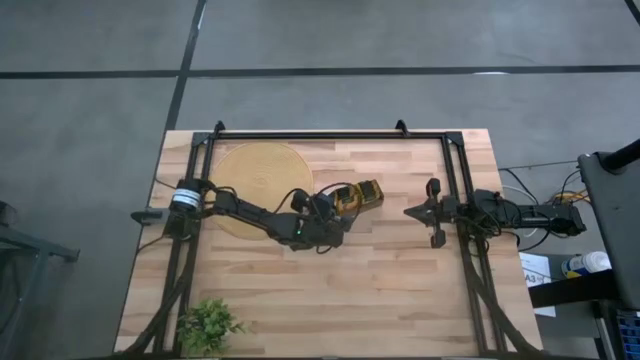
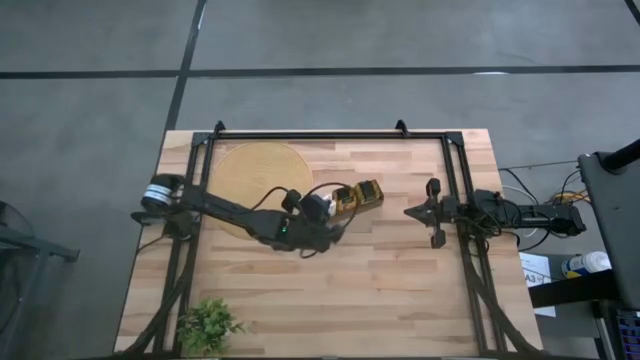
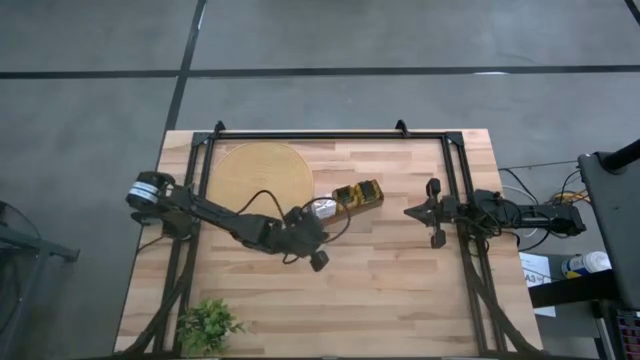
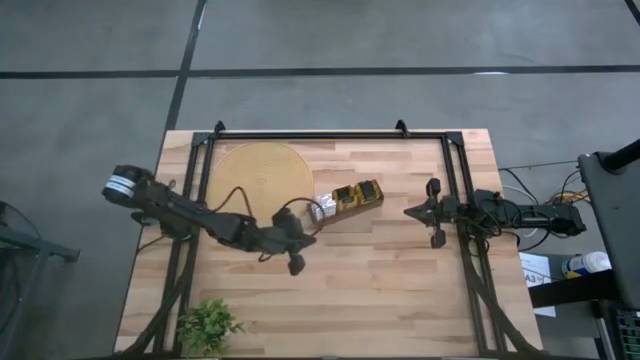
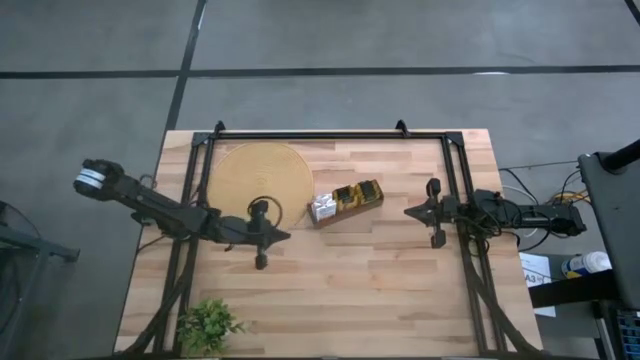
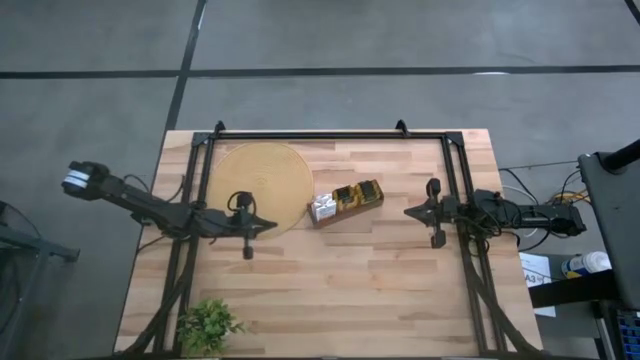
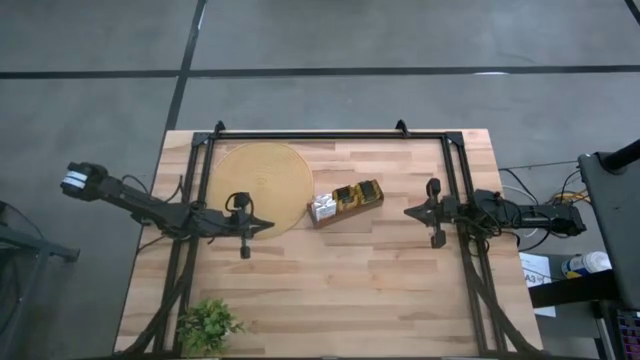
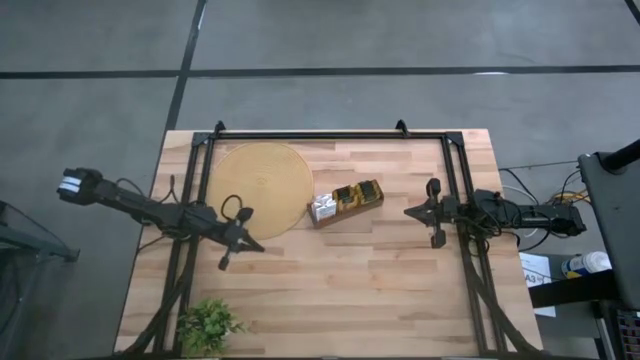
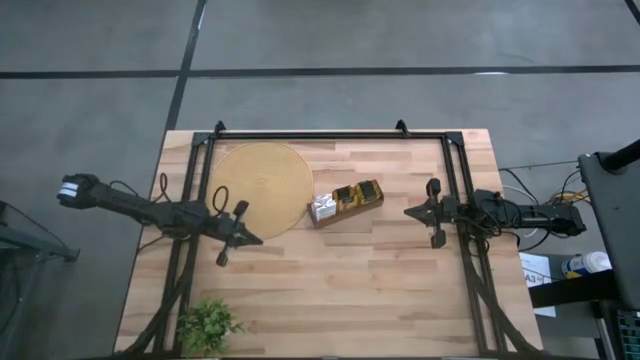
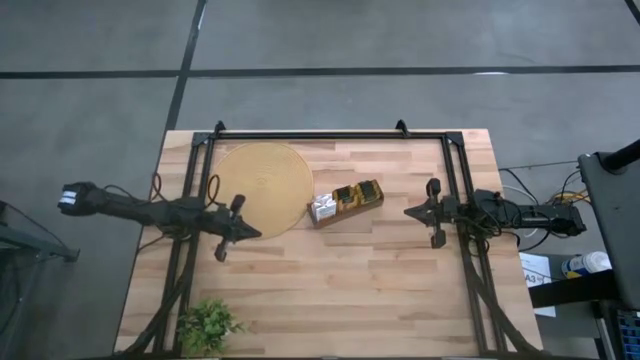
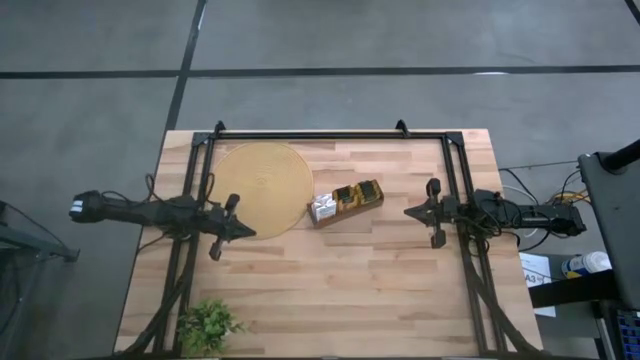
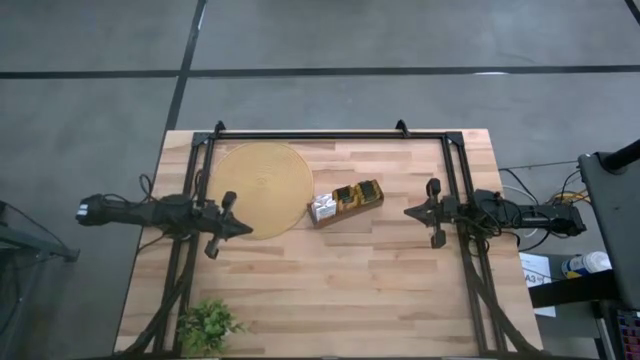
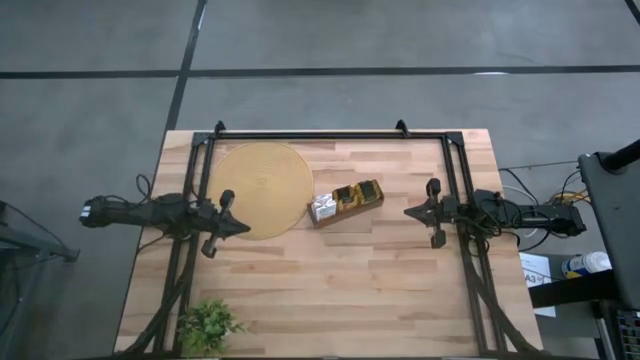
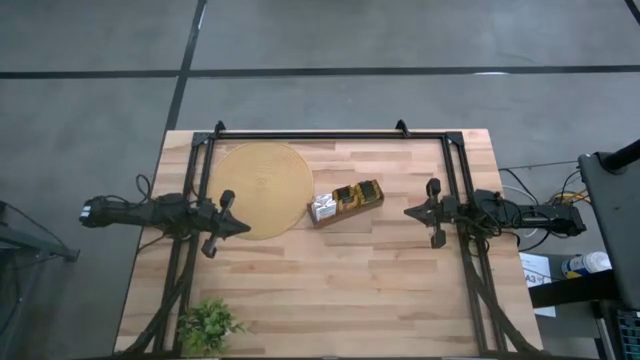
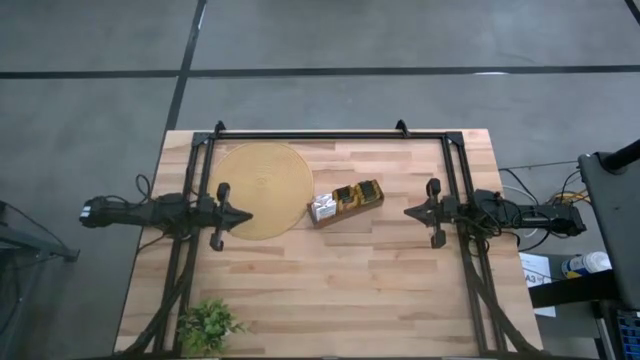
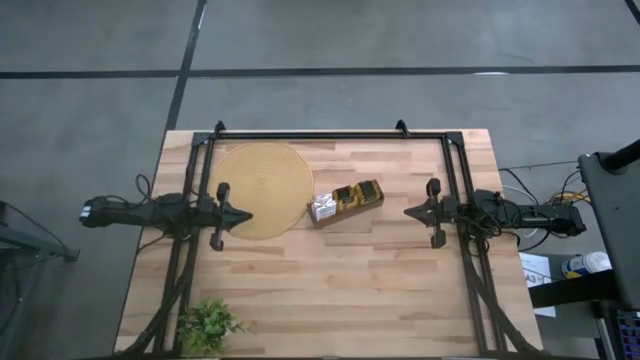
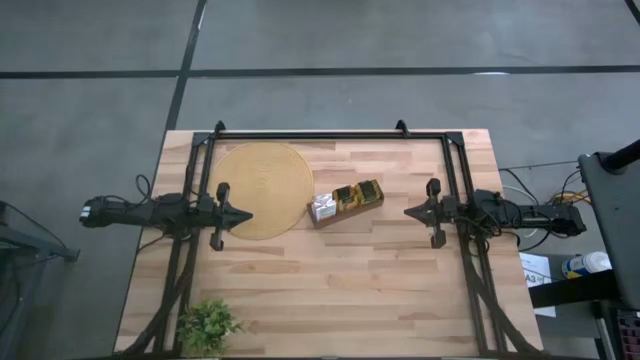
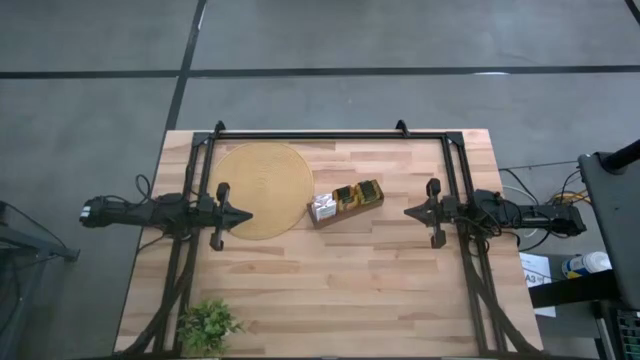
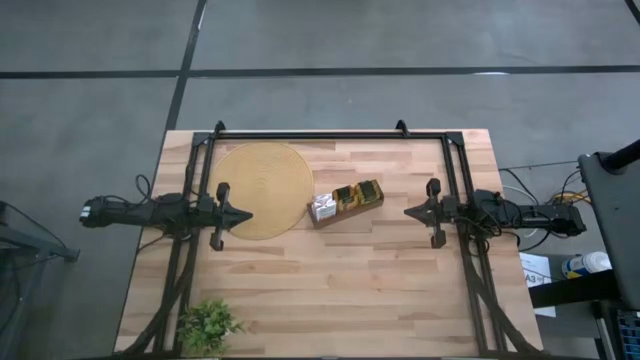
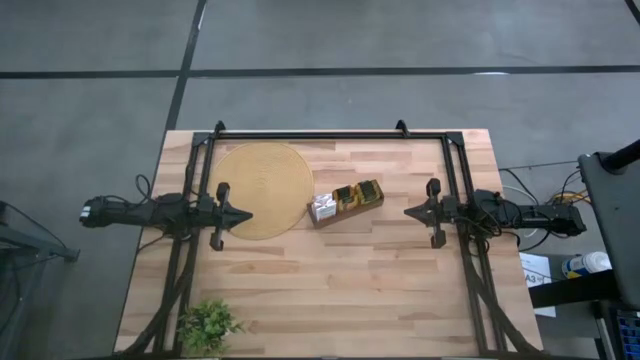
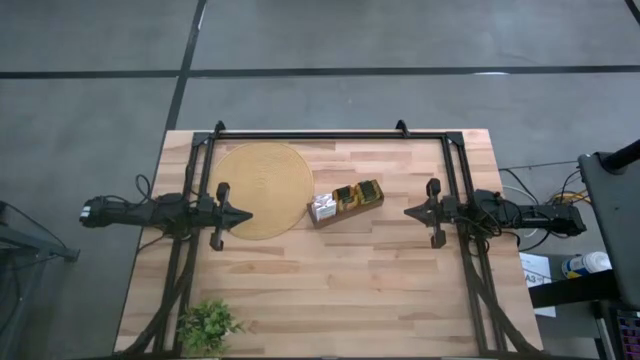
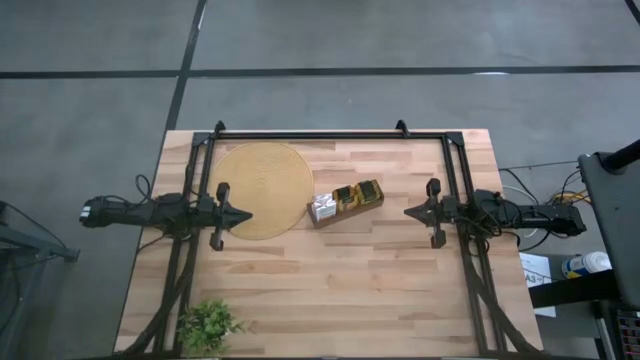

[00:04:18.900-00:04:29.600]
Task: Pick & Place Tea
Return to Home Position

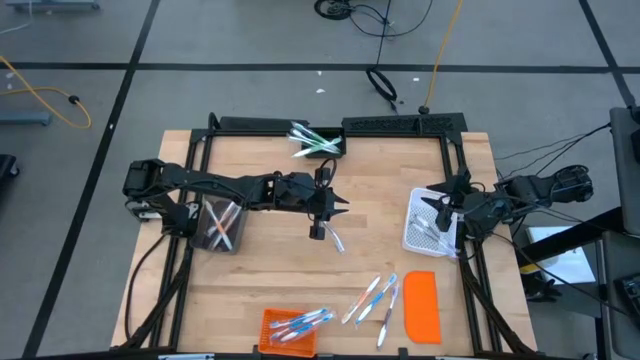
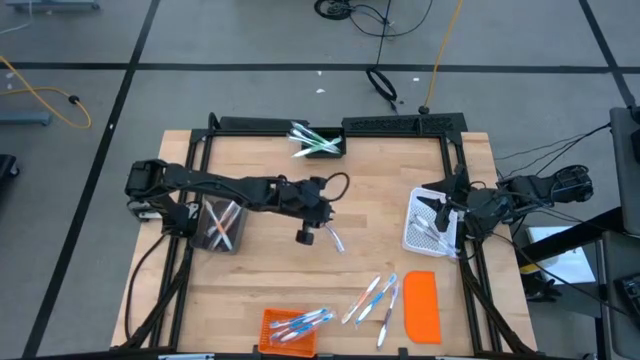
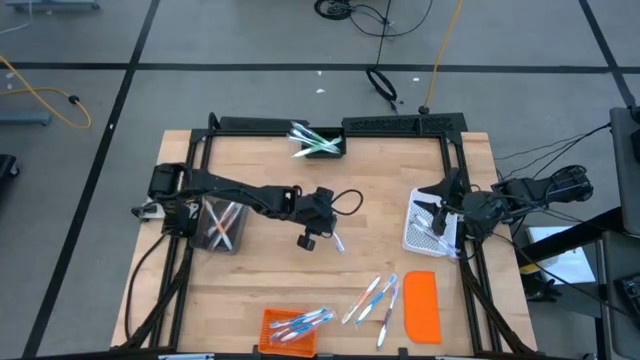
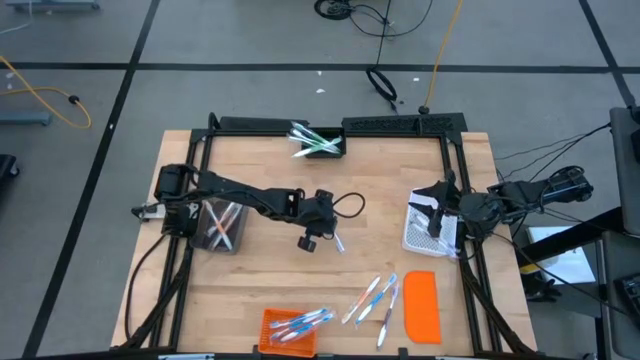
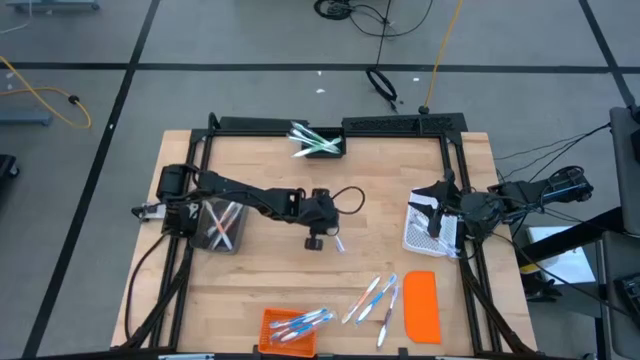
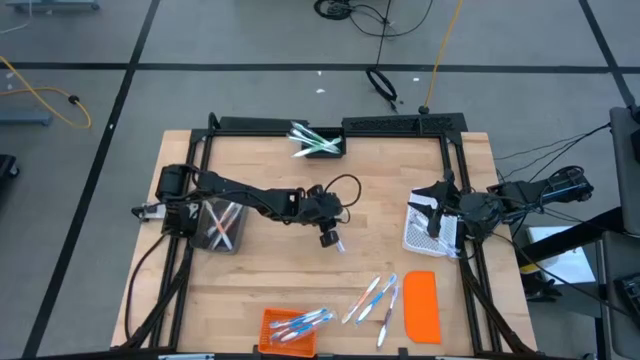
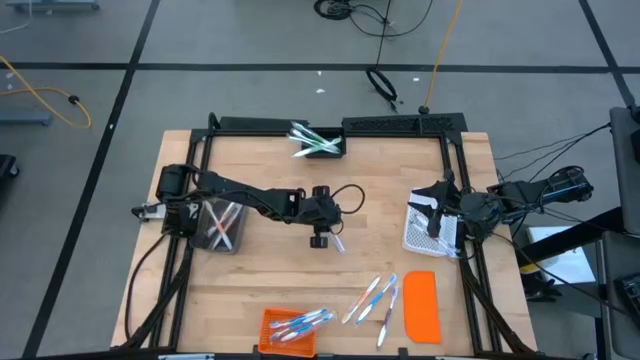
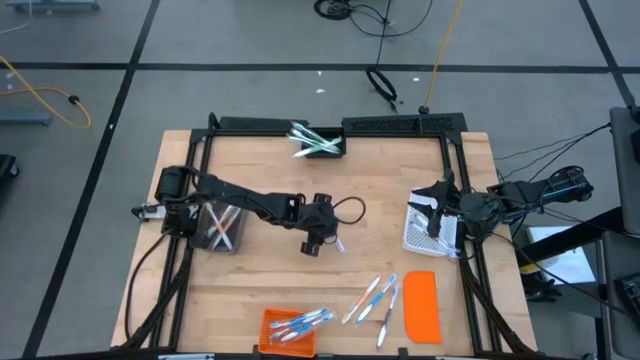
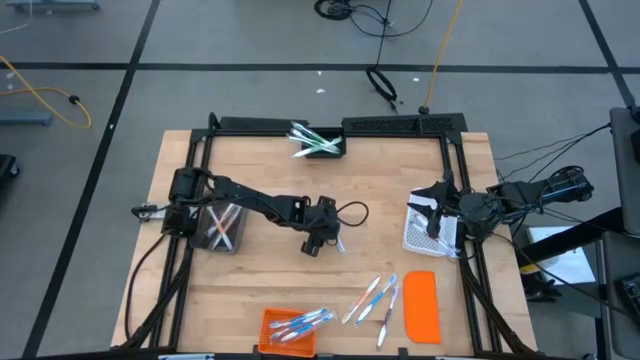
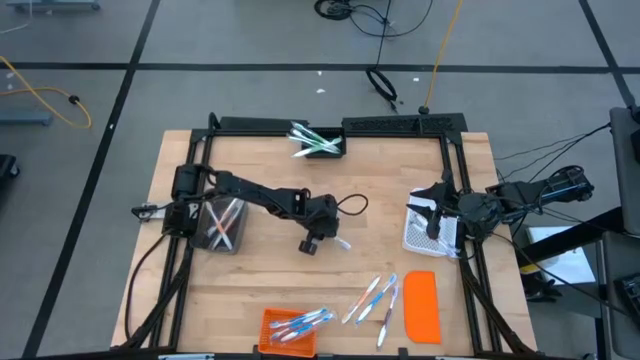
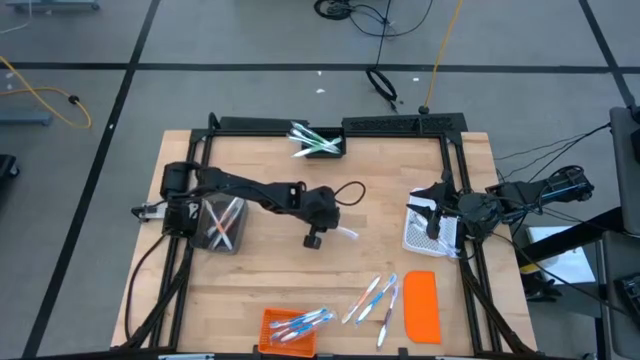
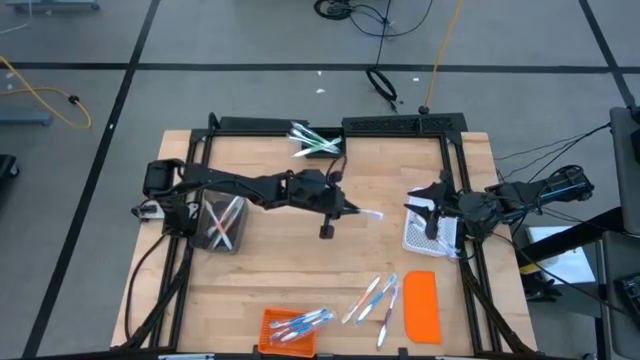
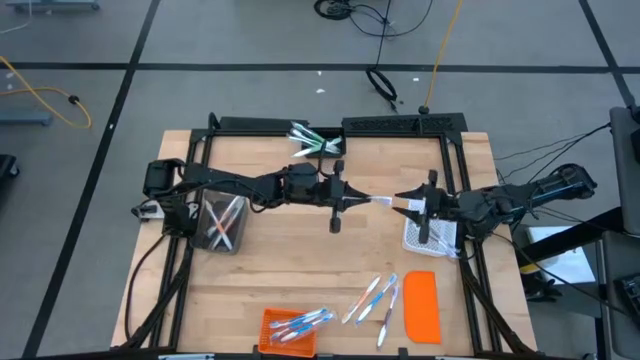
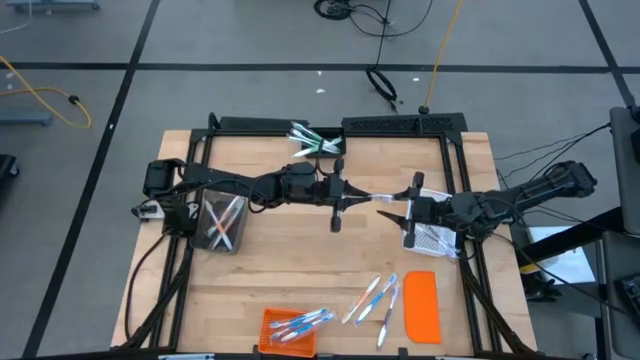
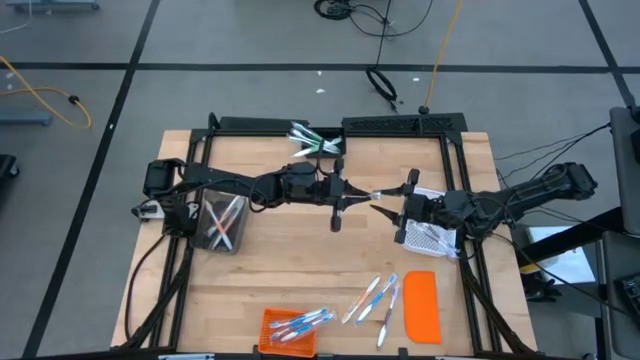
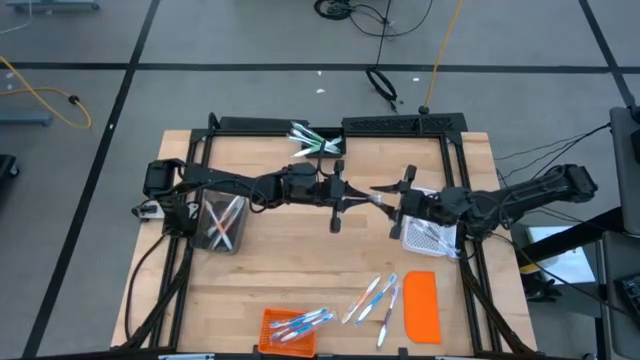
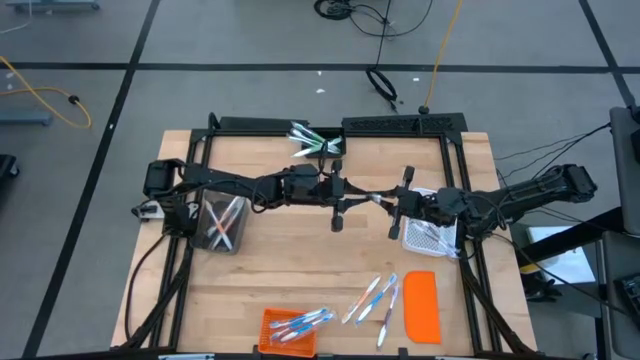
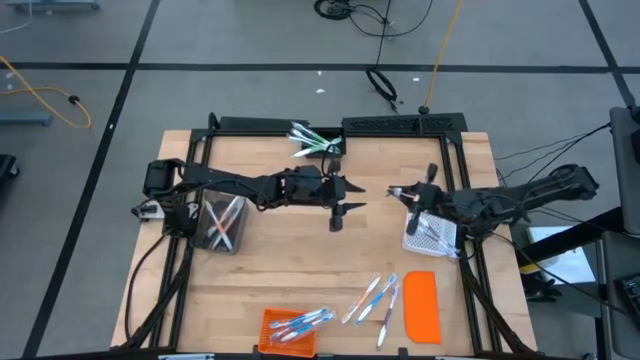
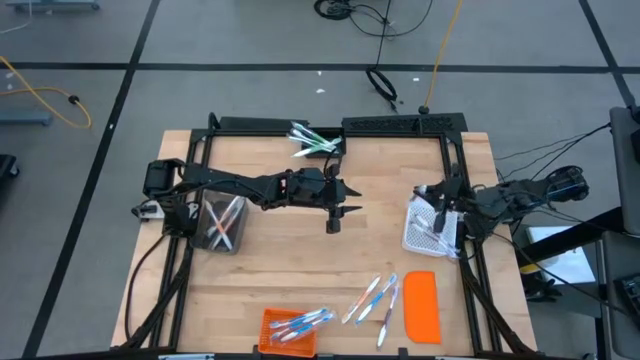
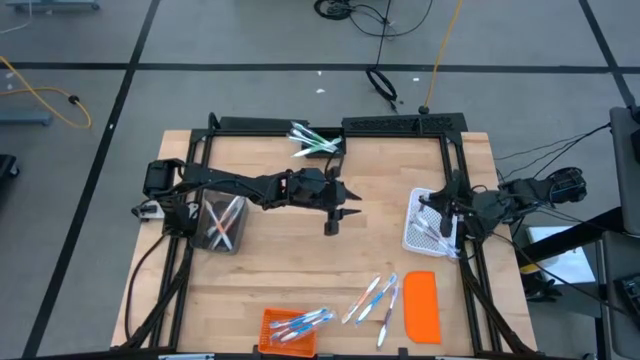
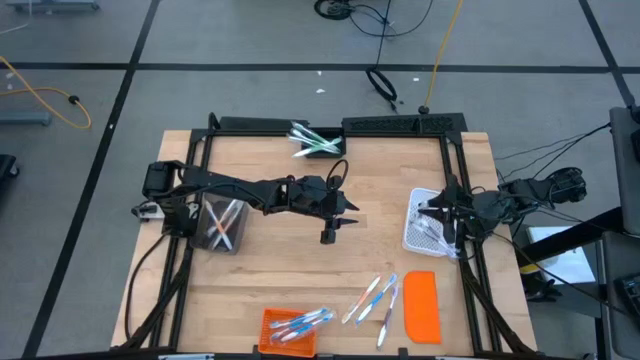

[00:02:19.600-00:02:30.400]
Task: Pick & Place Toothbrushes
Put the purple toothbrush into the white bin
